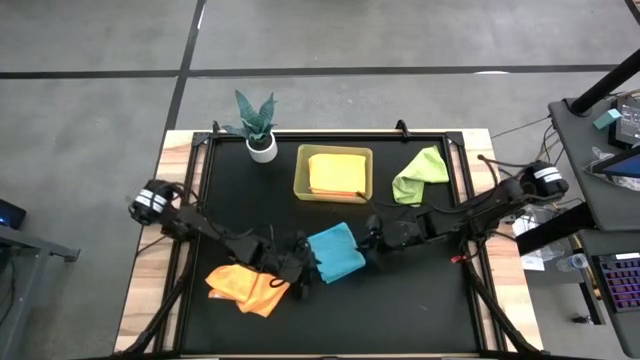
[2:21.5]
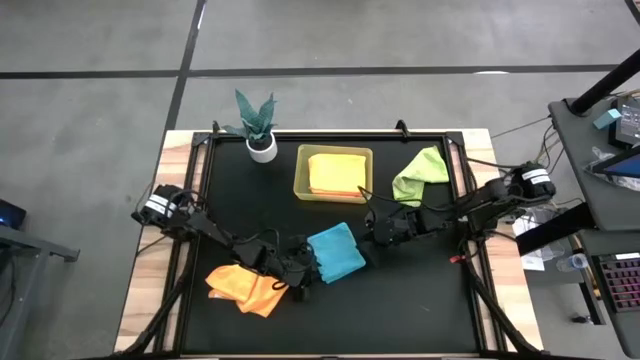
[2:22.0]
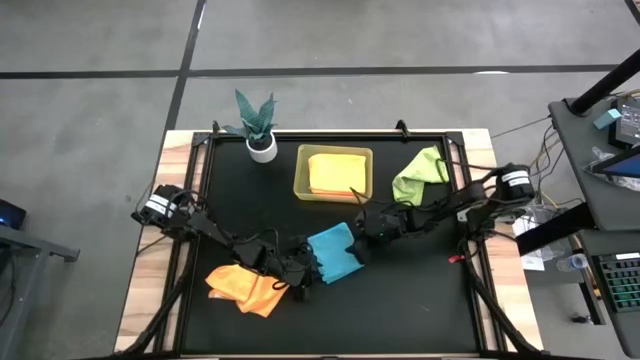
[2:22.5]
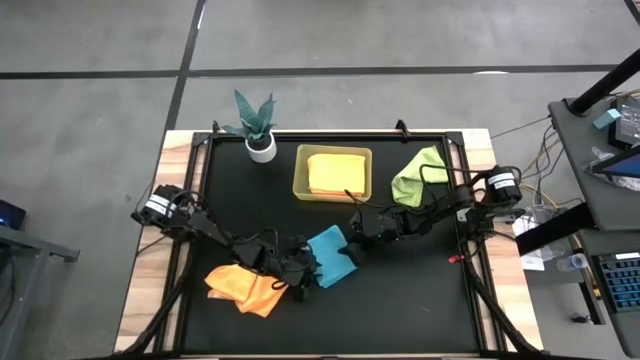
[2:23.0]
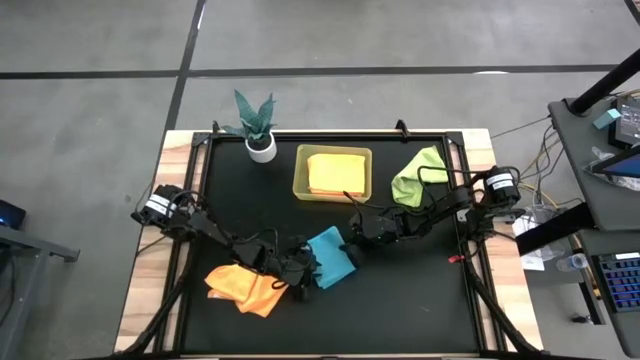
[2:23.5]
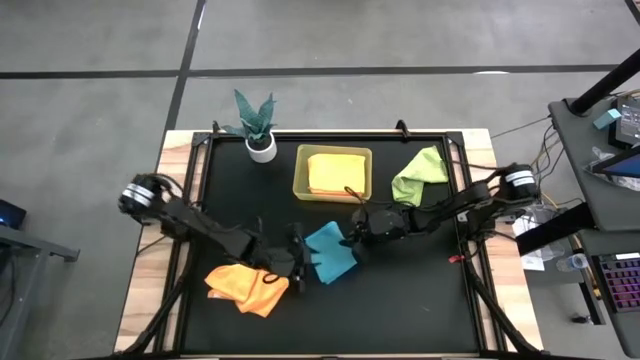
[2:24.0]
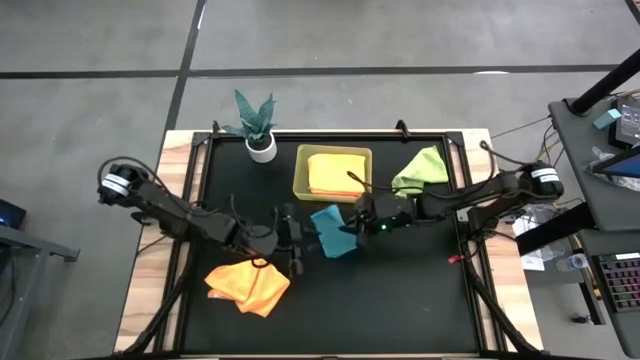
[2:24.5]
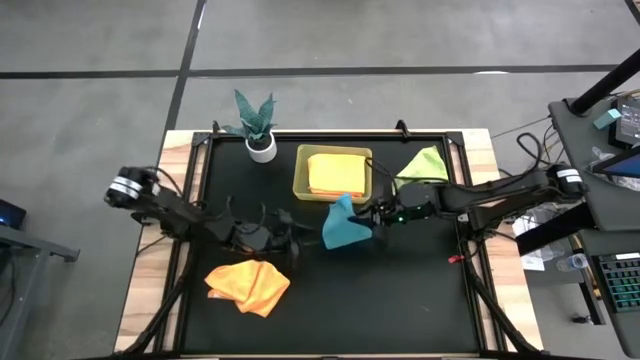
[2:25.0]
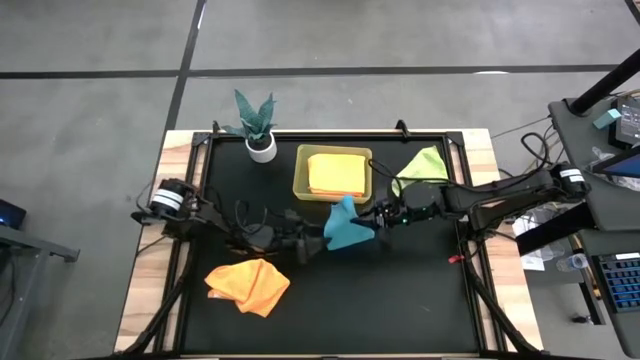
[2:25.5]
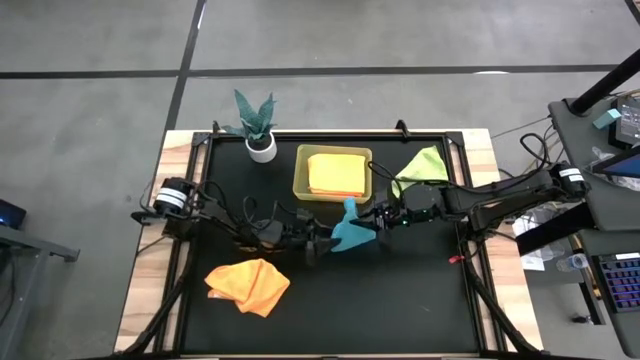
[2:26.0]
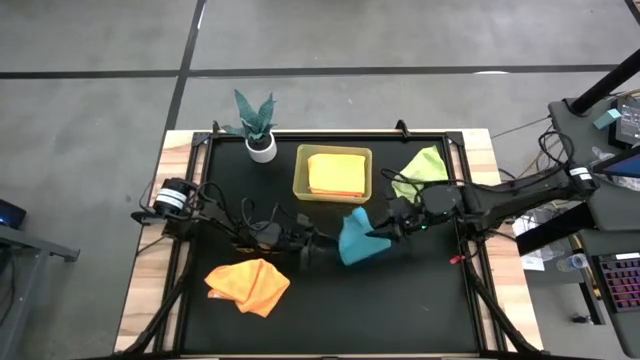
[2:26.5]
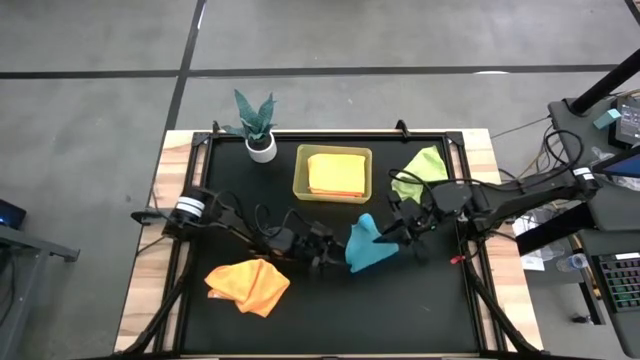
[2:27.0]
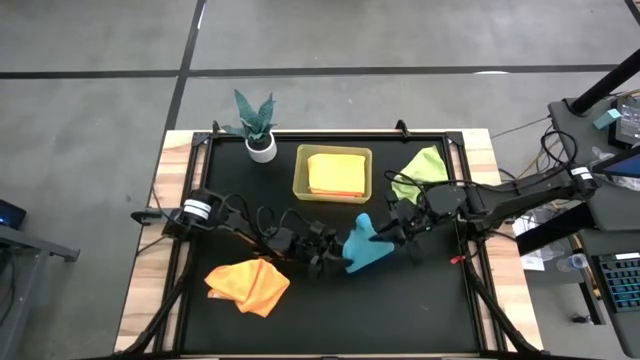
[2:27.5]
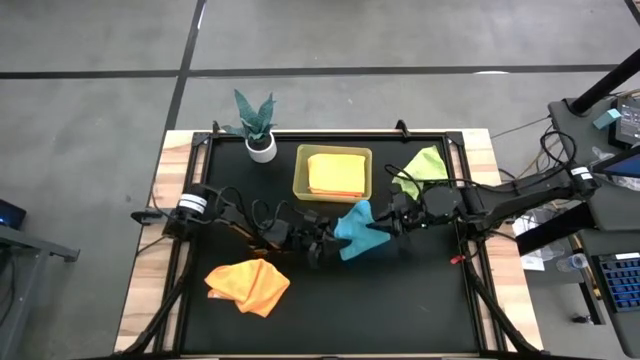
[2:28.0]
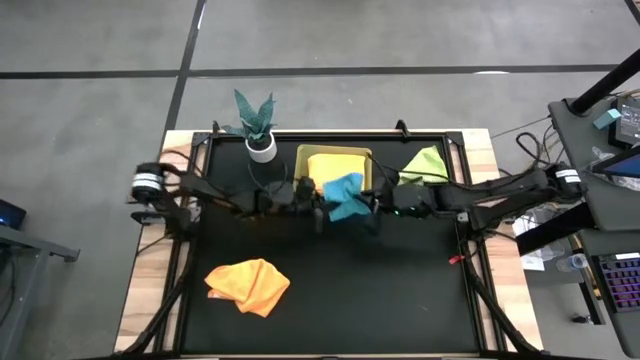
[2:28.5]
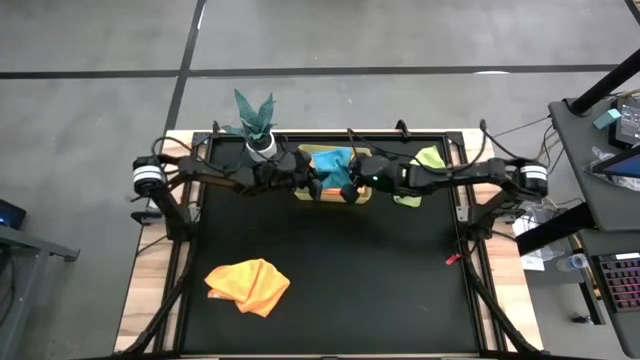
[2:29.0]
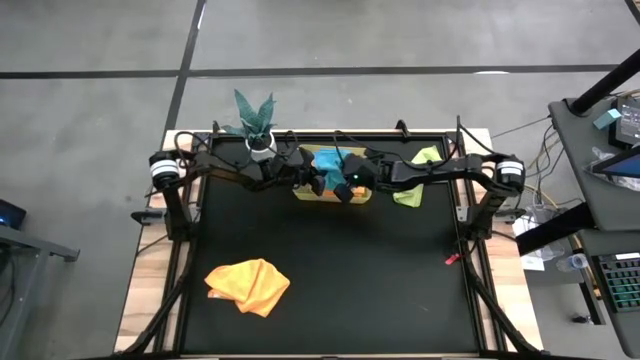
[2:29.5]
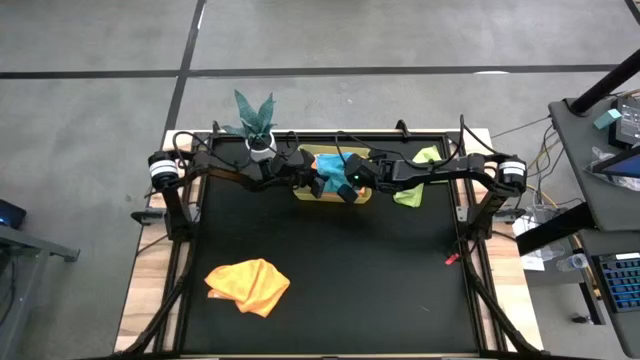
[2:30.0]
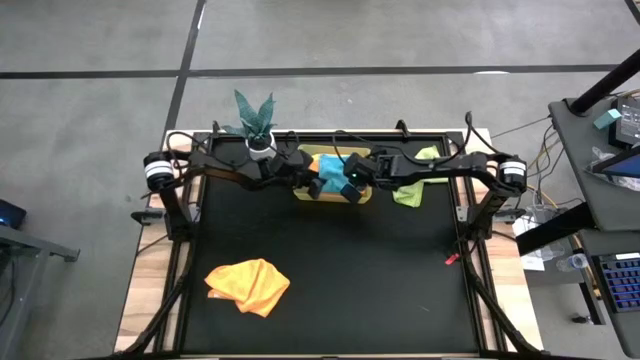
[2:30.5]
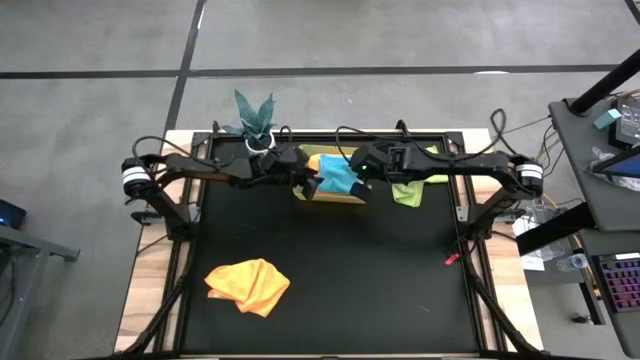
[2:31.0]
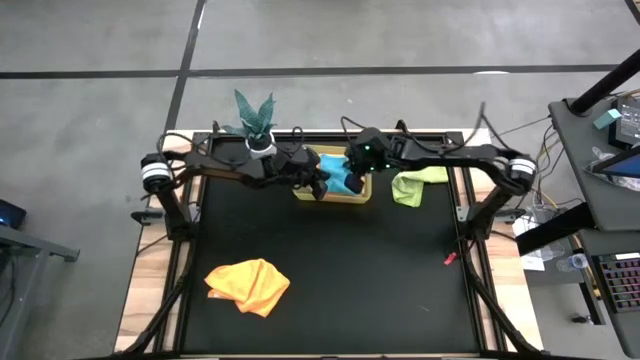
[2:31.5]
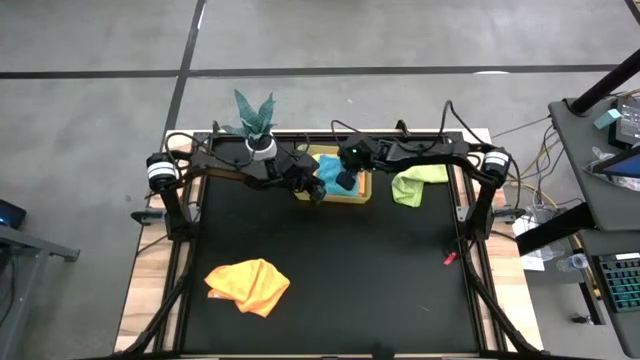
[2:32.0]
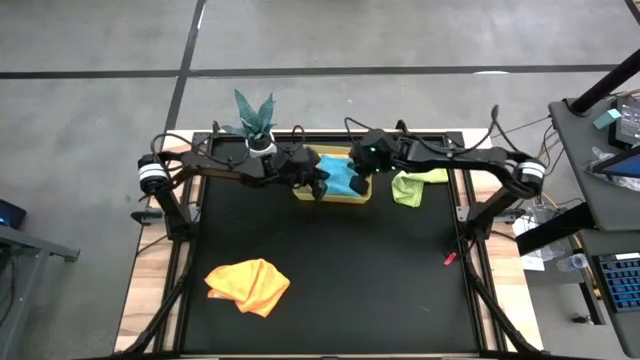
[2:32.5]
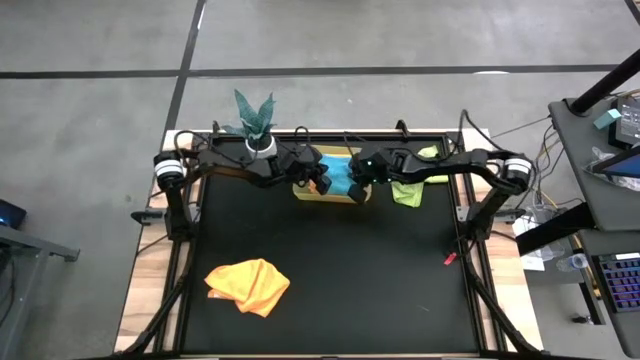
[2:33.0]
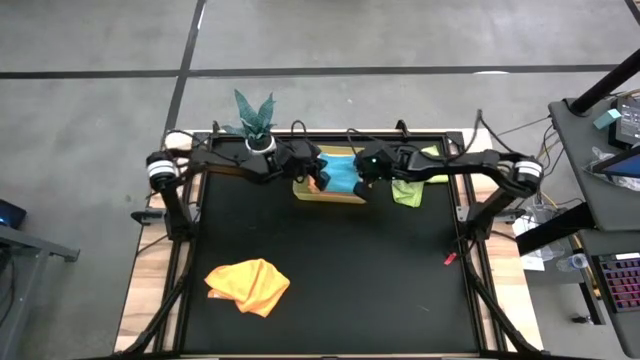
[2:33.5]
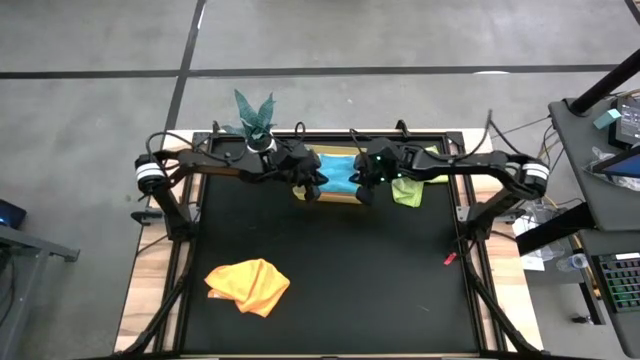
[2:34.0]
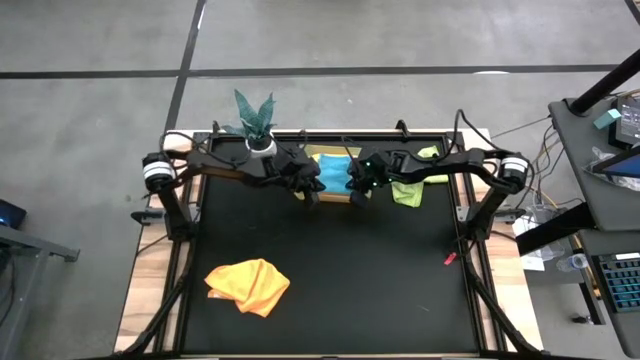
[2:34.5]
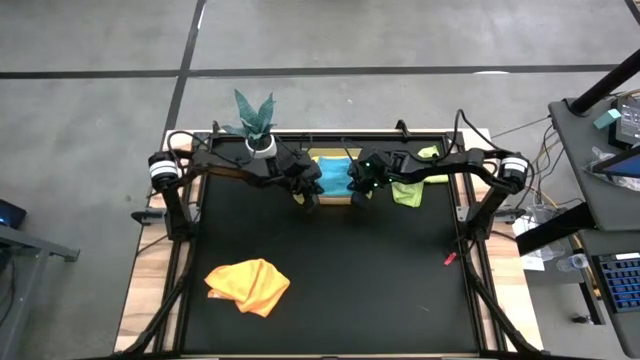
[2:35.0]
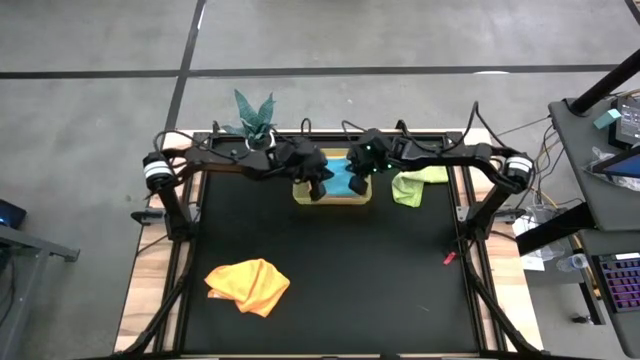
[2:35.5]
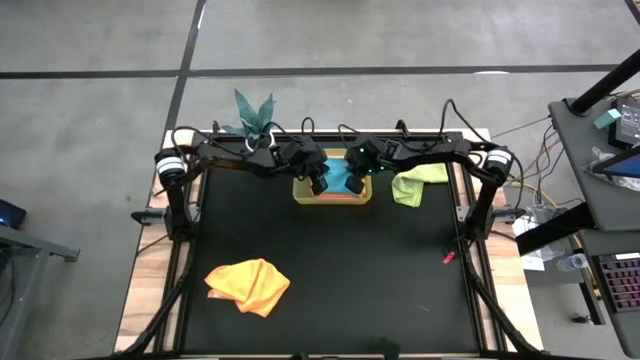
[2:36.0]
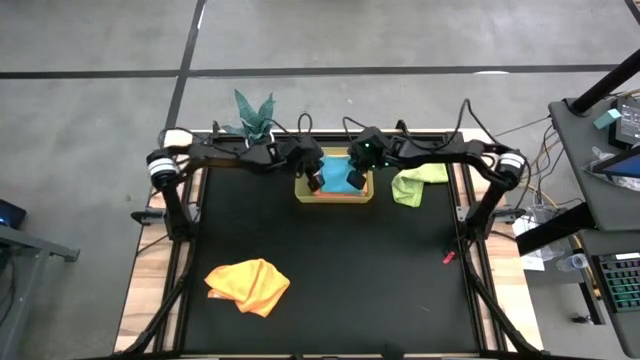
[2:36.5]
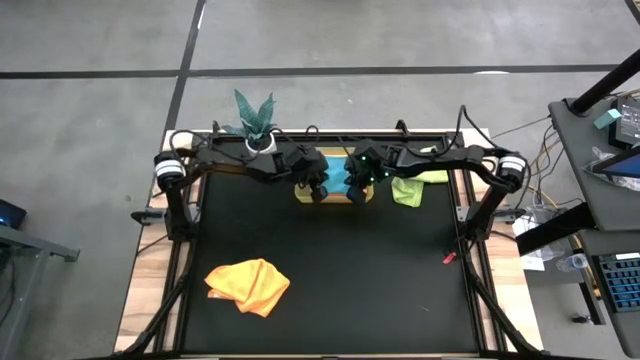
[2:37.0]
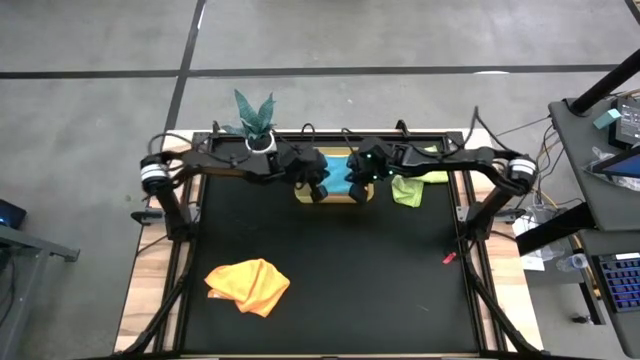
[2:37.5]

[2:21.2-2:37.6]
Task: Fold microfiber towels
Put the folded blue towel into the bin
